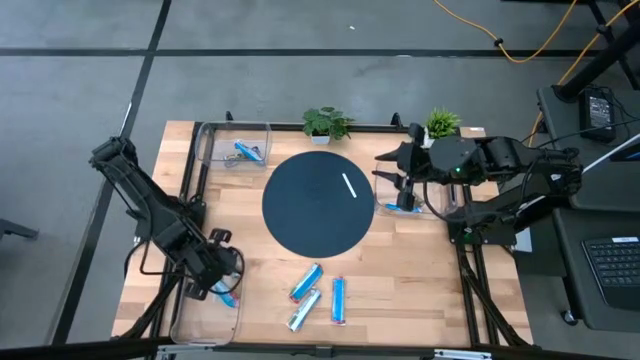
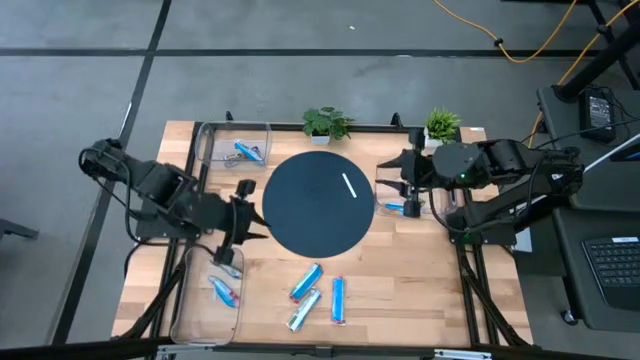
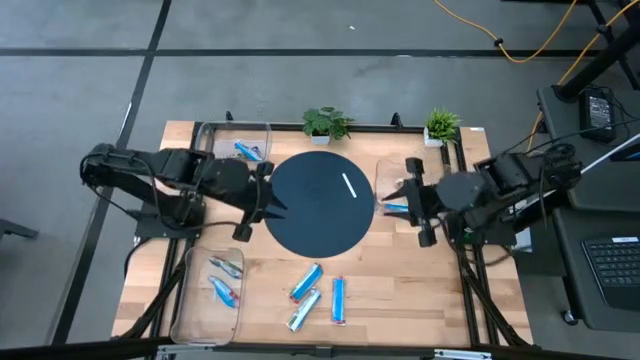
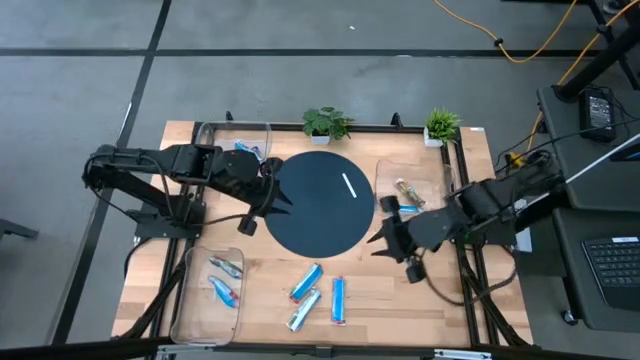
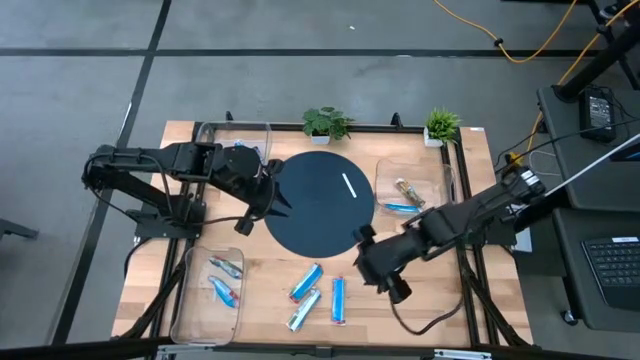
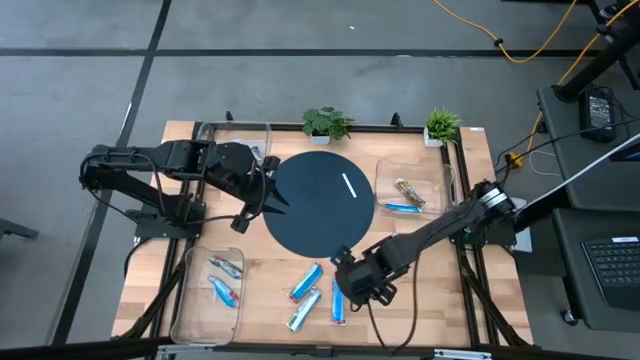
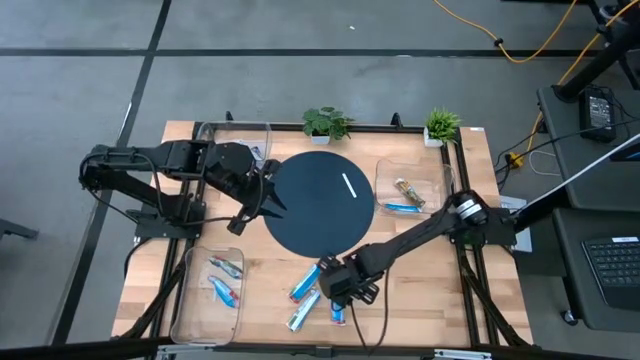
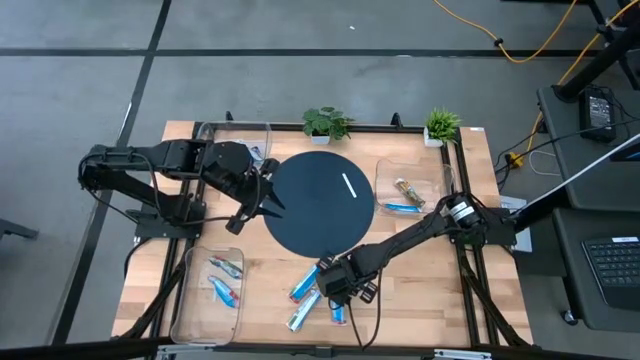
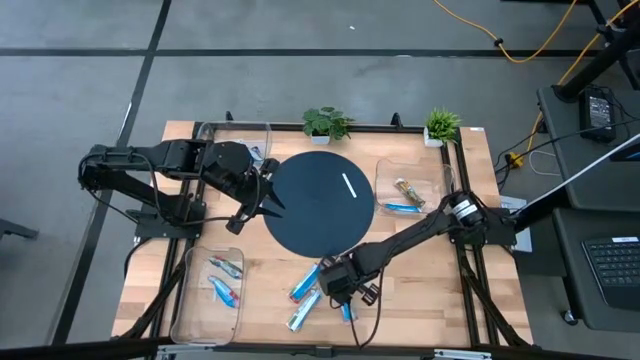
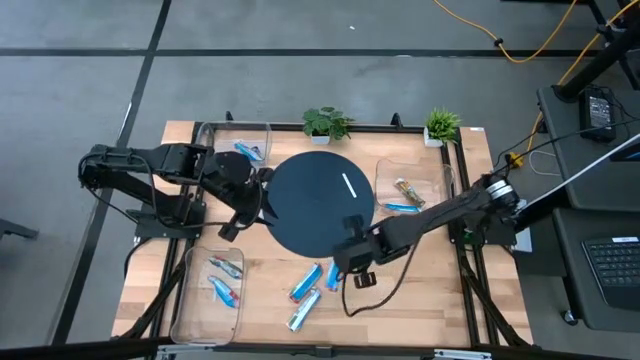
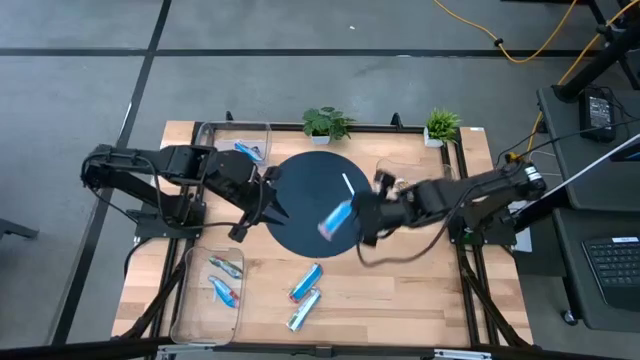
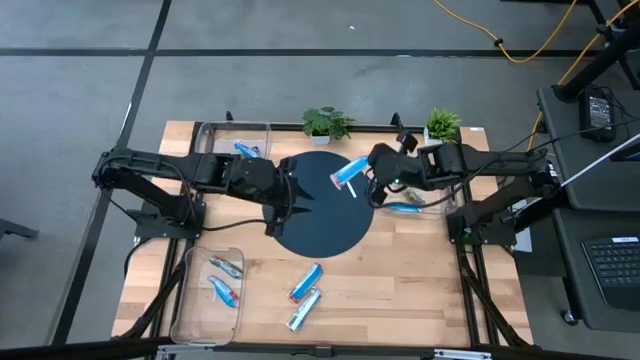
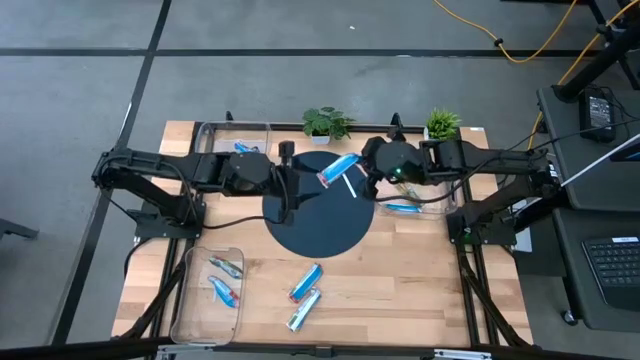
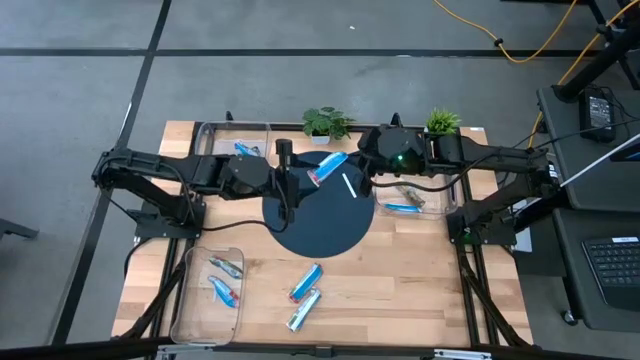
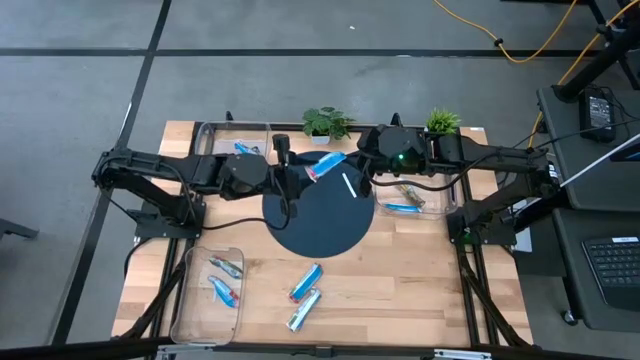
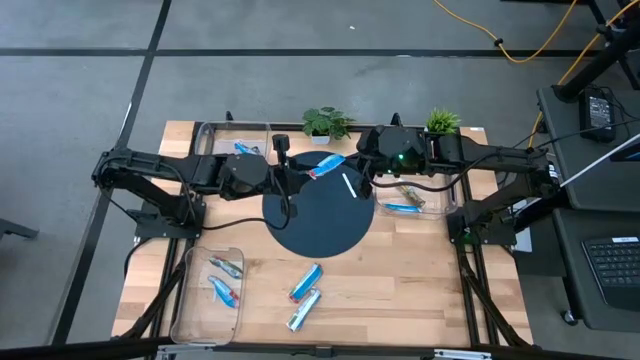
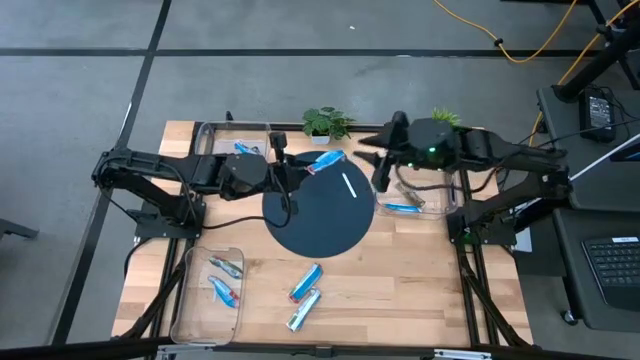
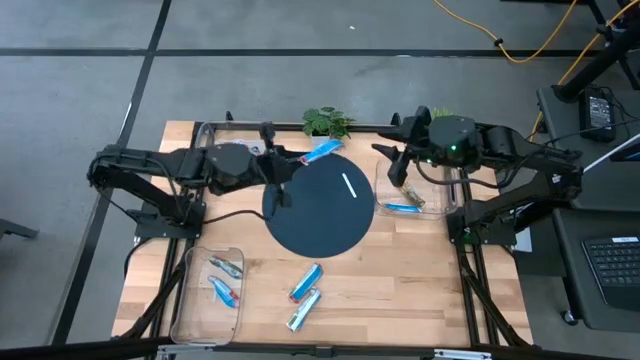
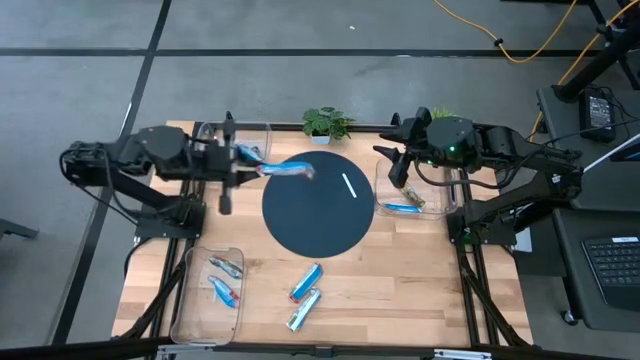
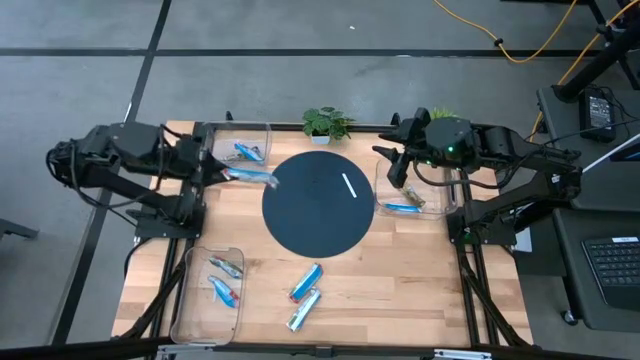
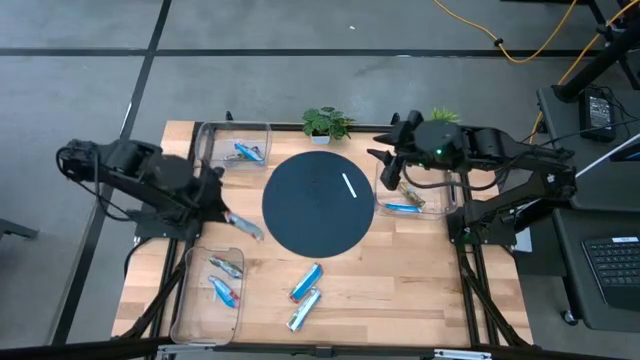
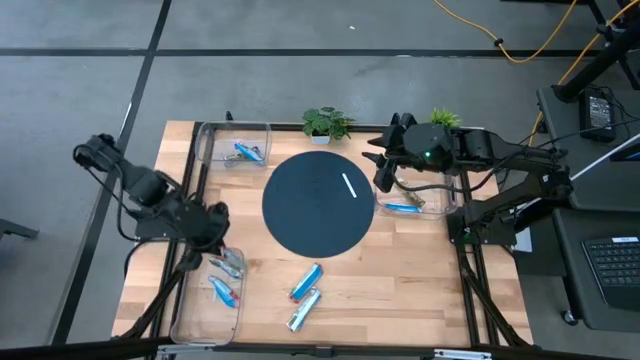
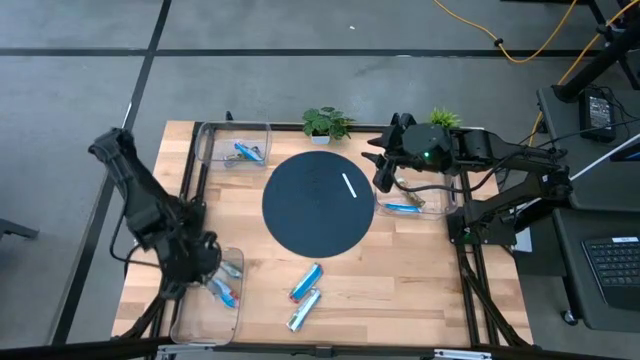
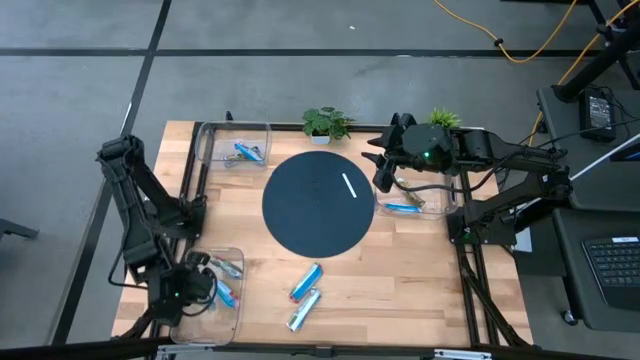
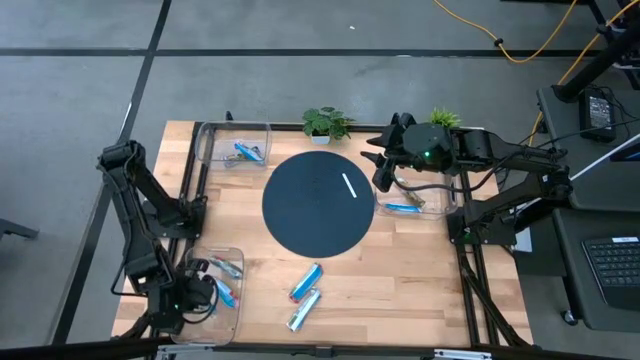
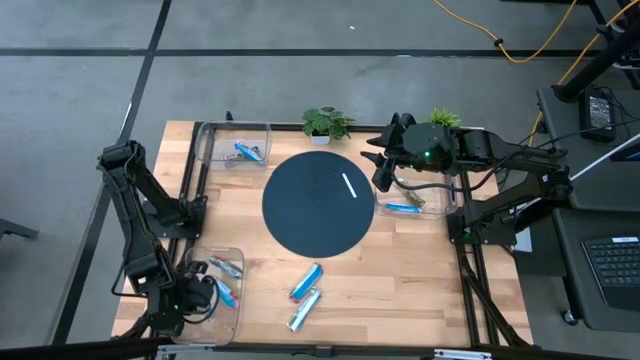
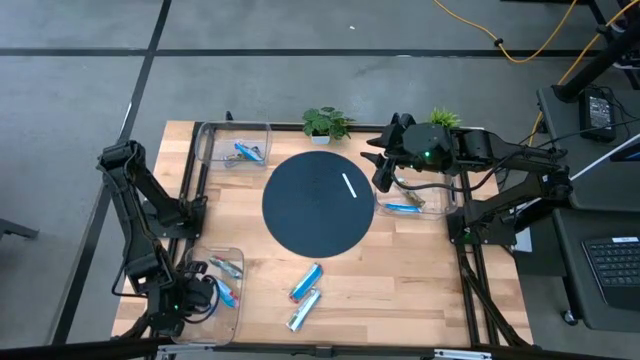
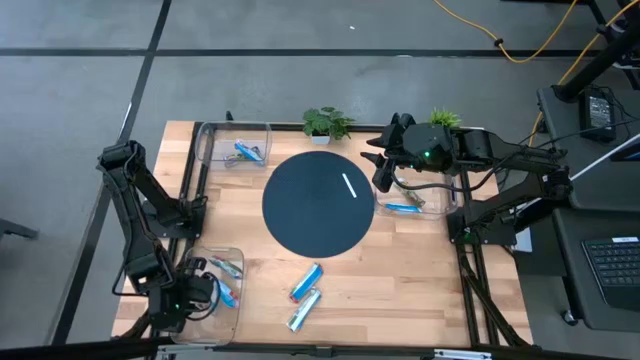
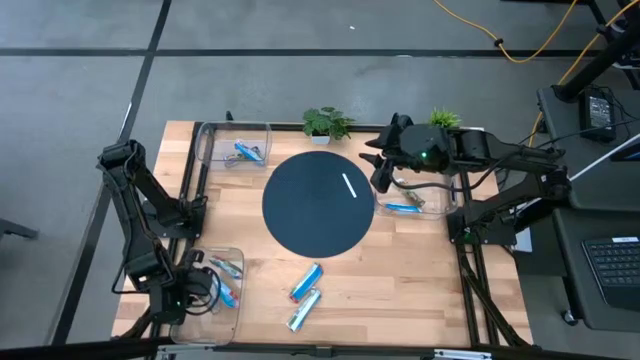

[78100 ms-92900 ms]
Task: Pick and place Granola Bars by type
Put the red granola bar into the bottom transparent bin

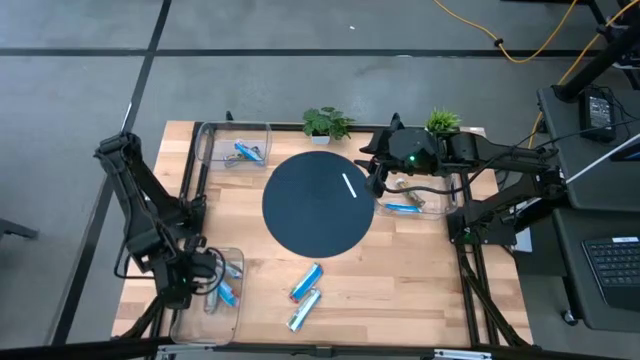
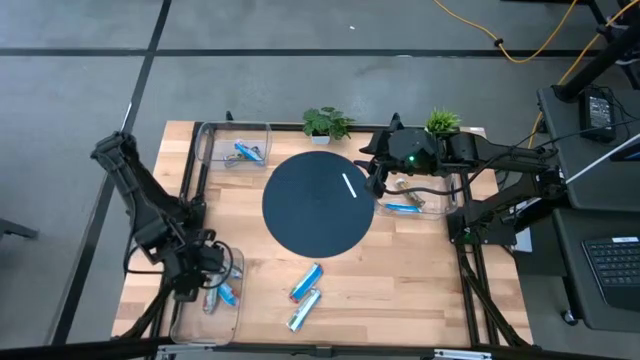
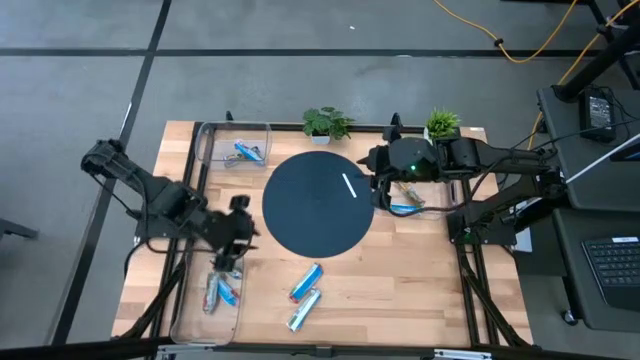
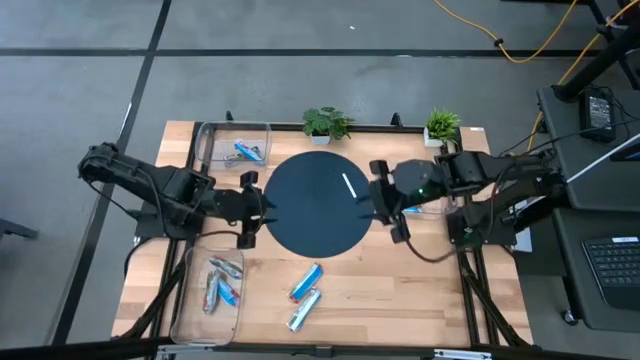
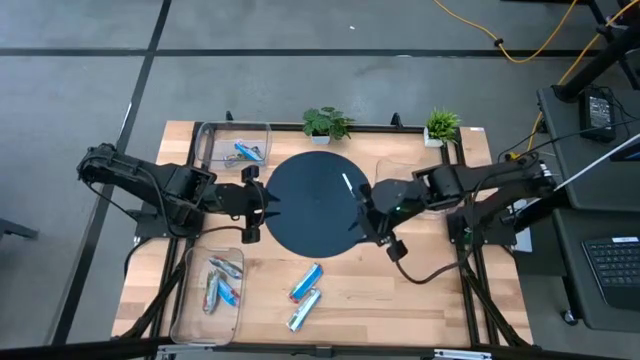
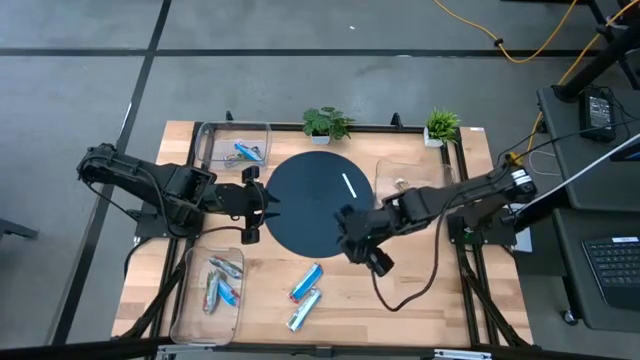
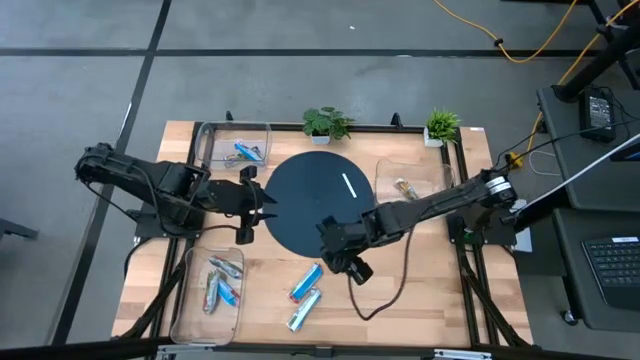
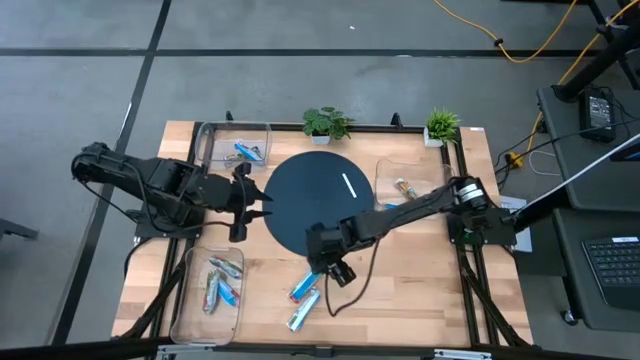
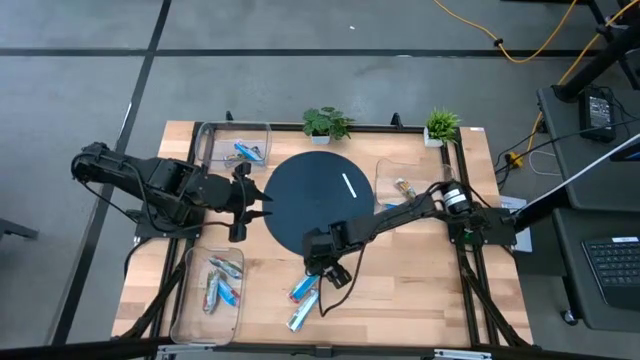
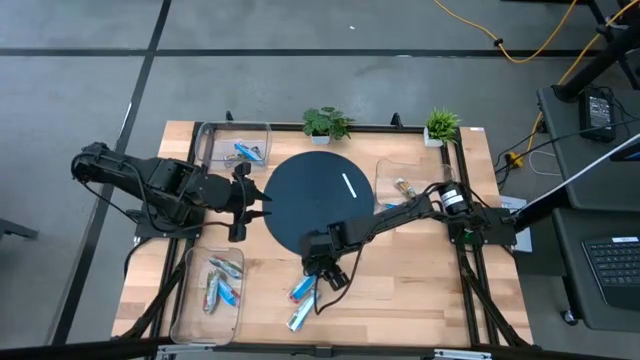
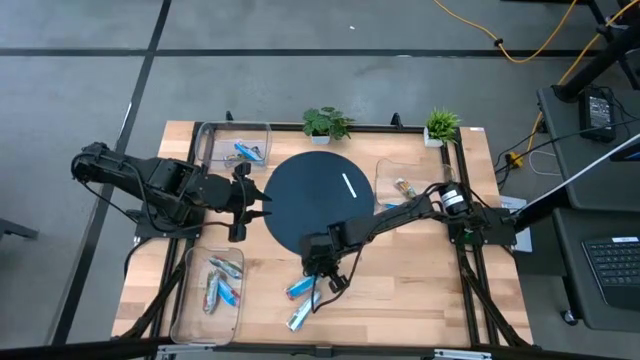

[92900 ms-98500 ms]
Put the red granola bar into the bottom transparent bin

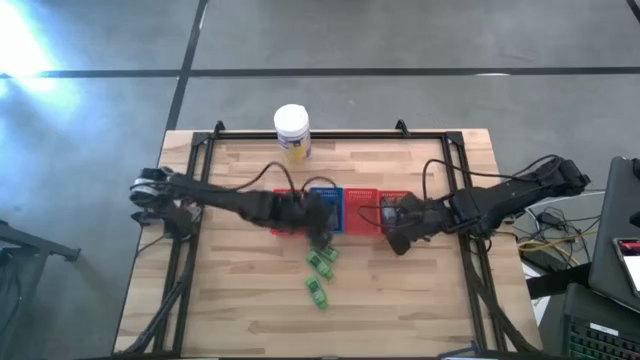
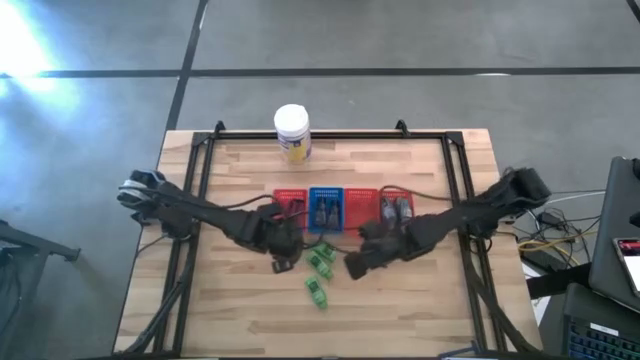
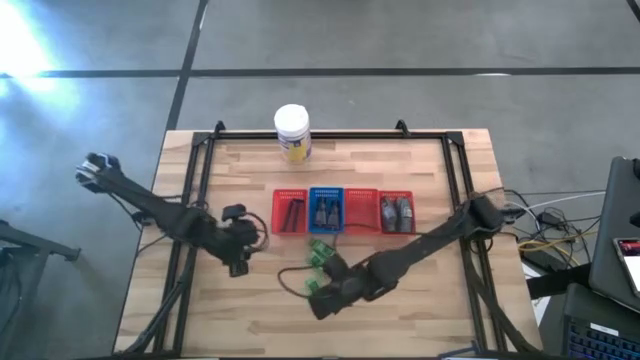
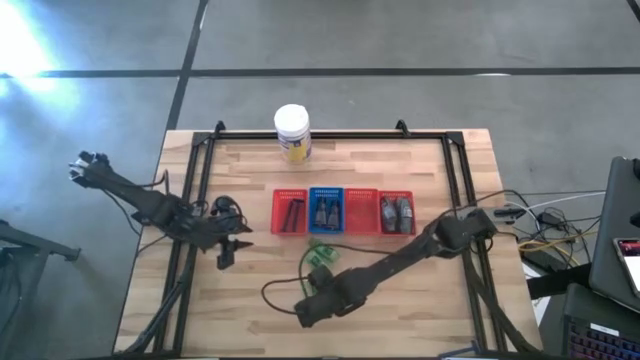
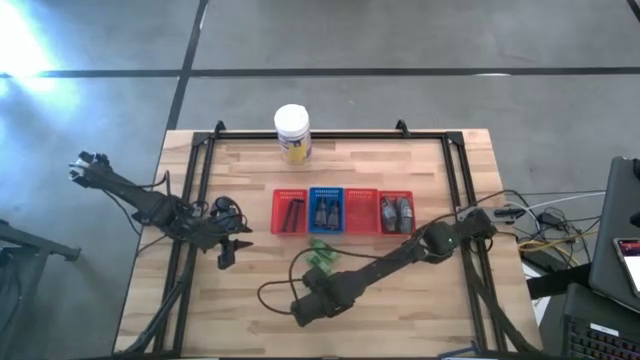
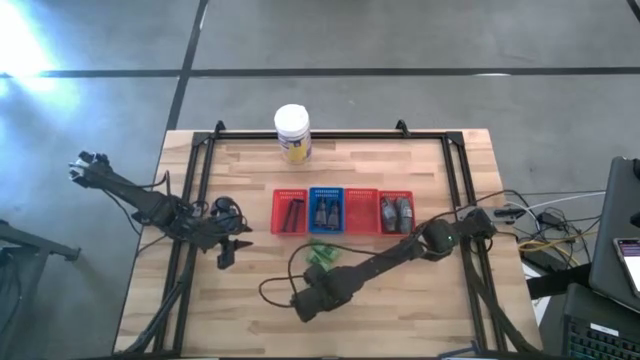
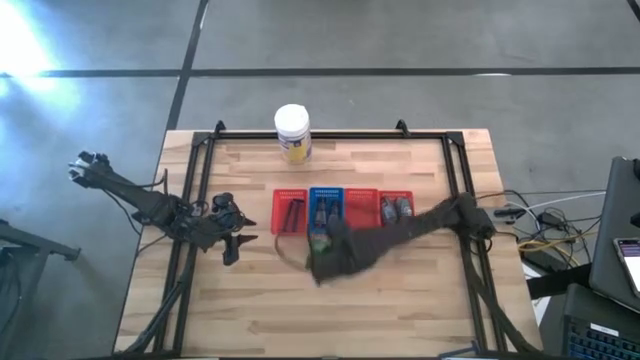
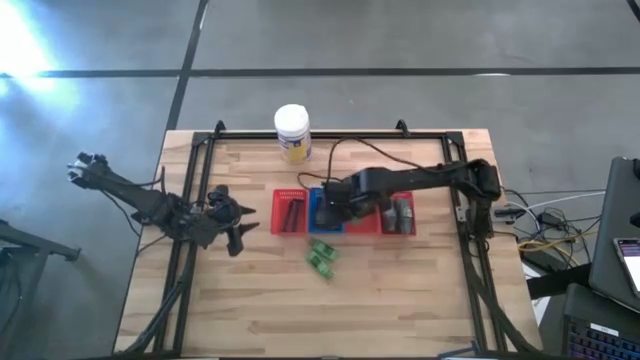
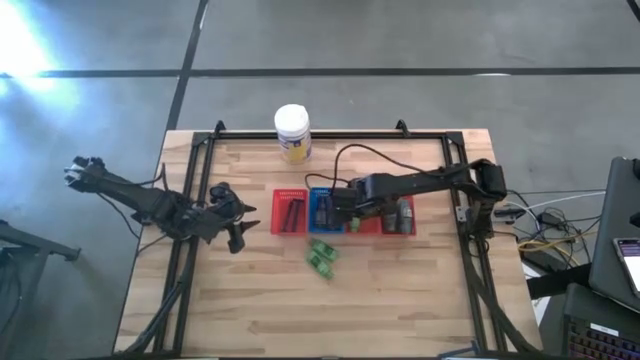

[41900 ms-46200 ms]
Task: Pick & Place Travel size toiletries
Put the bottom shampoo into the middle red bin
